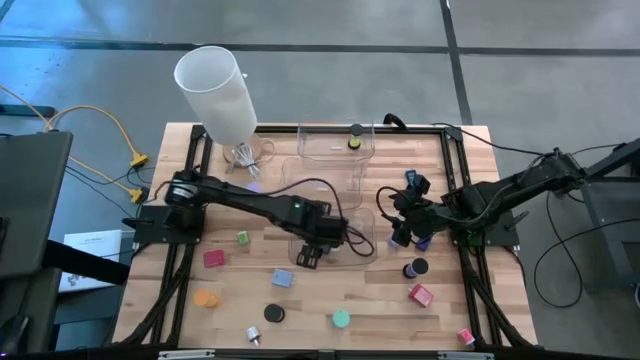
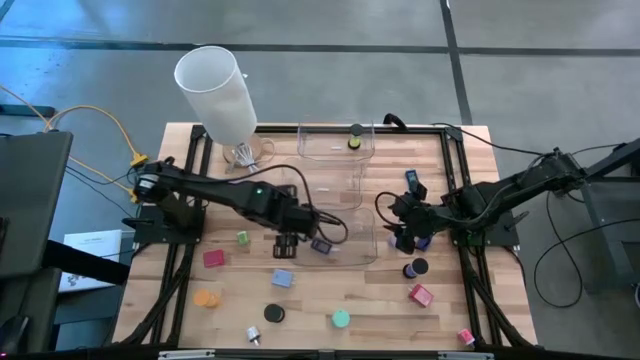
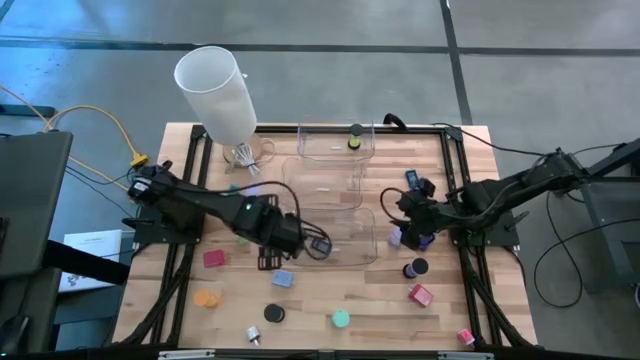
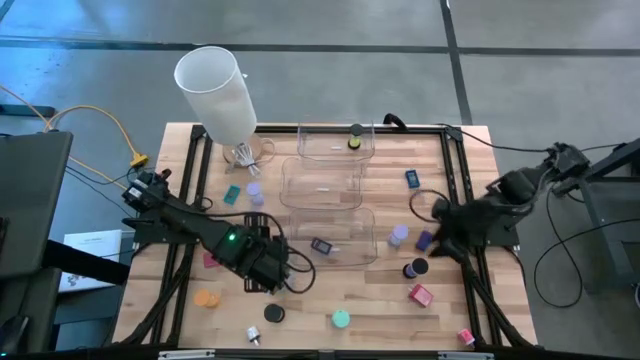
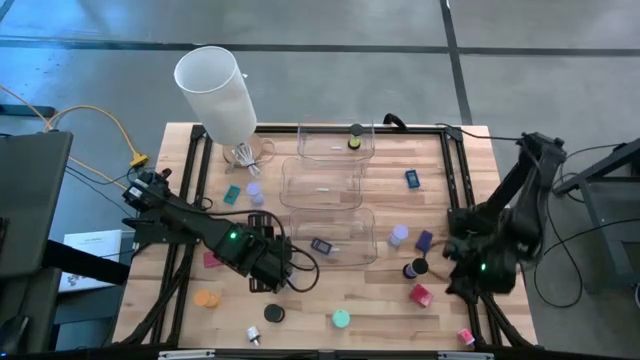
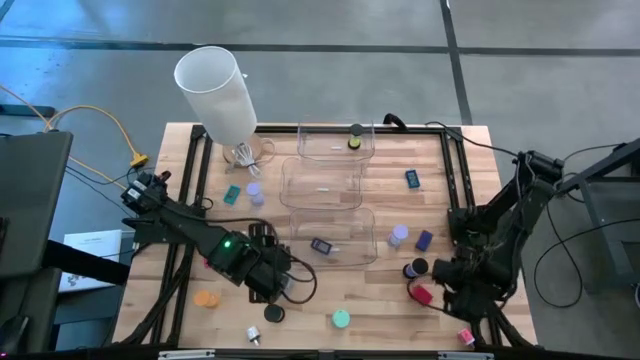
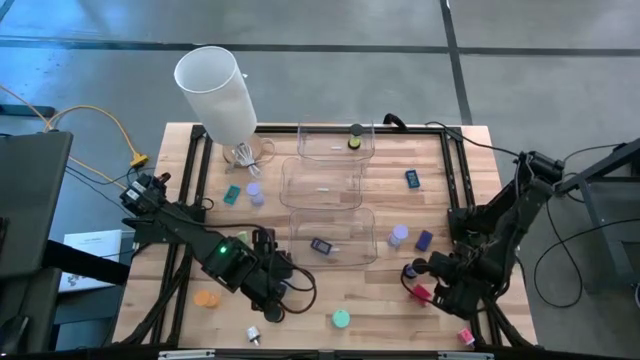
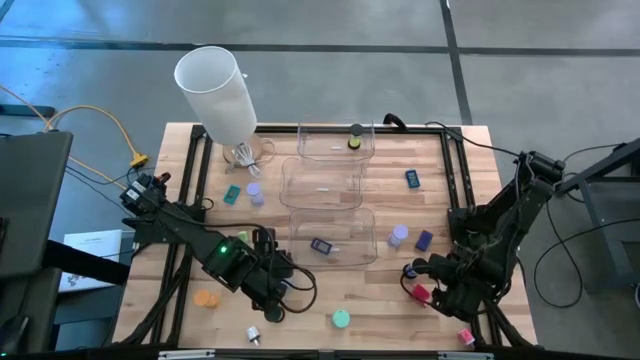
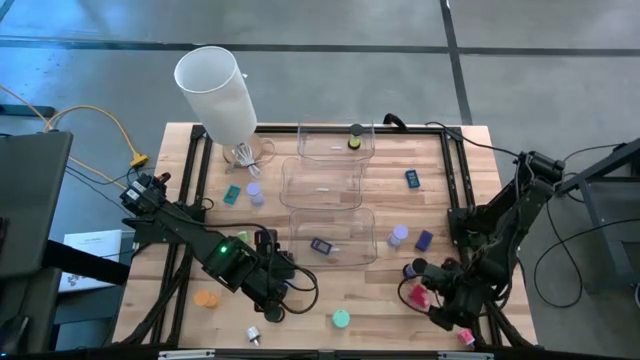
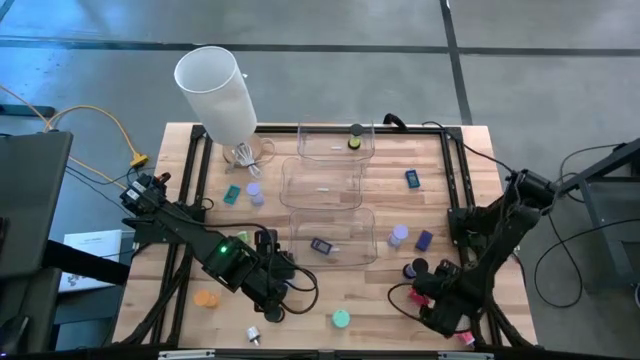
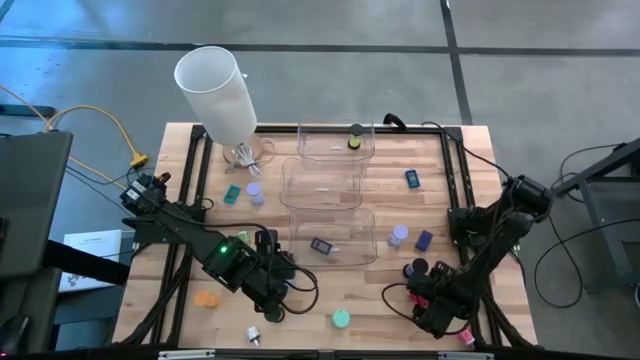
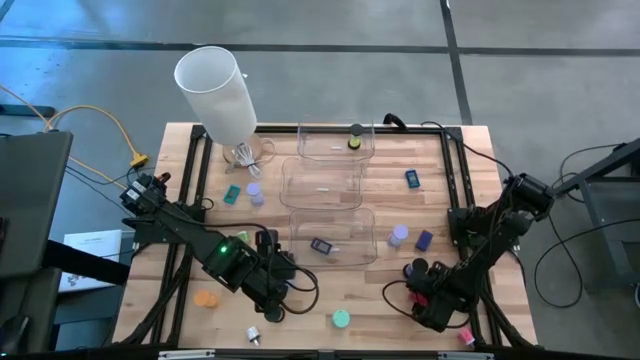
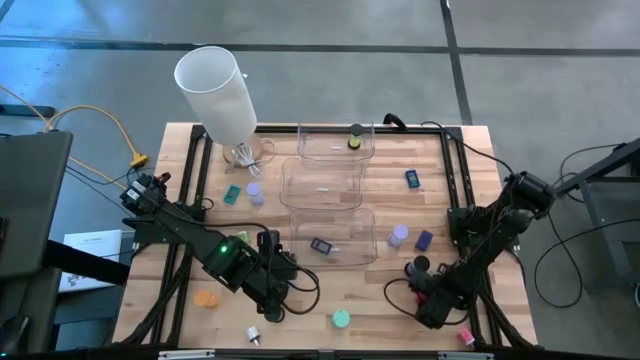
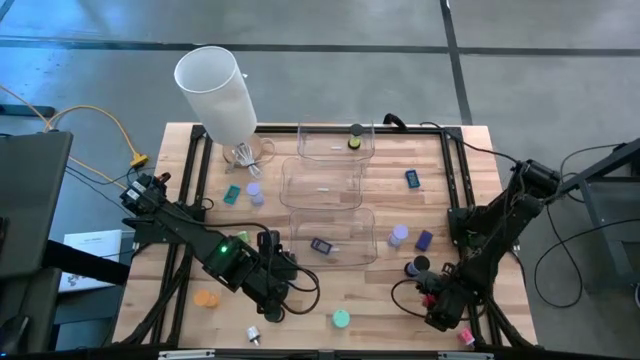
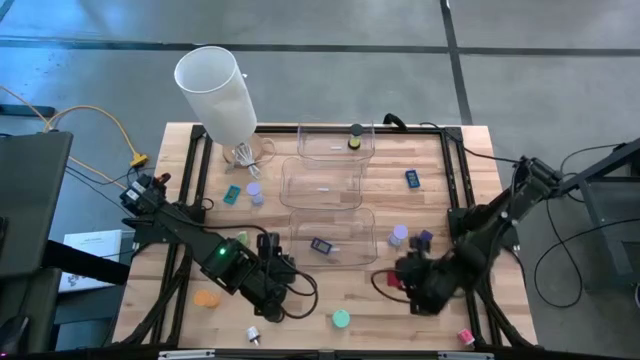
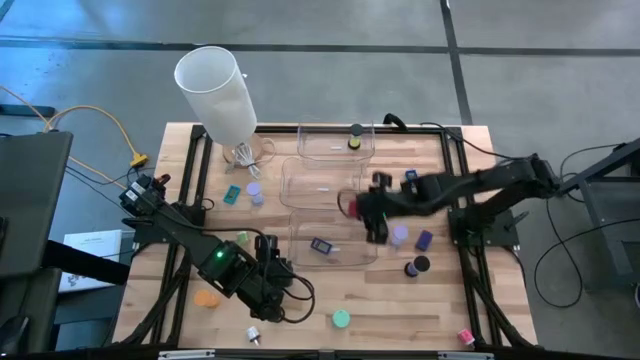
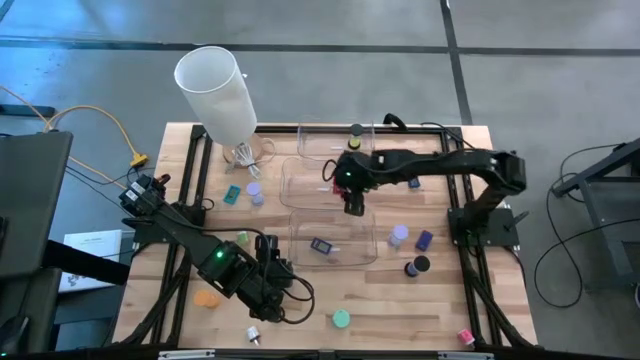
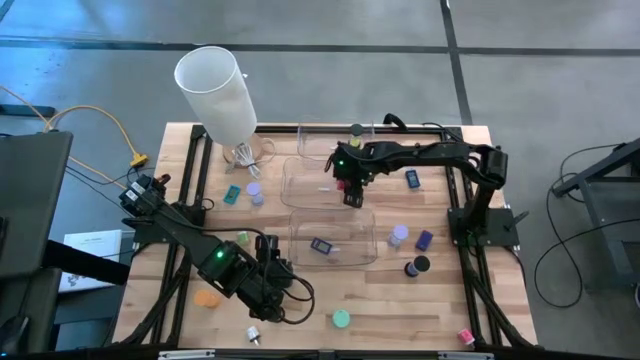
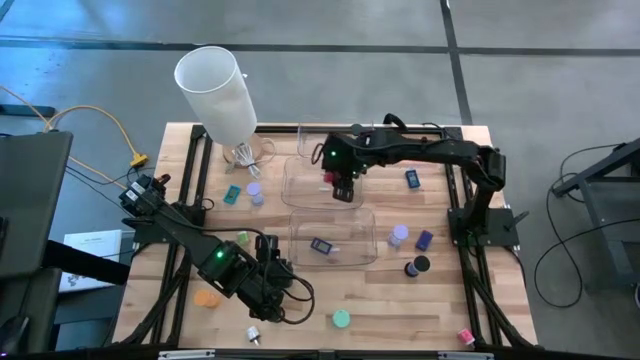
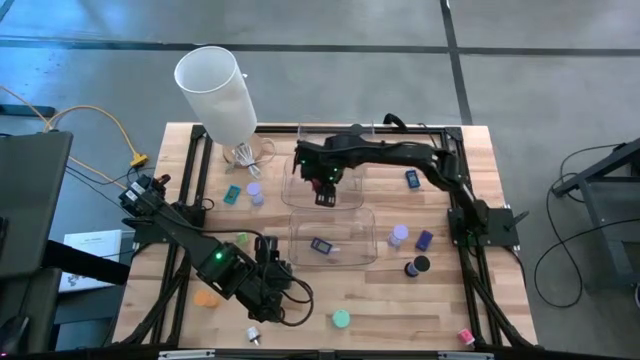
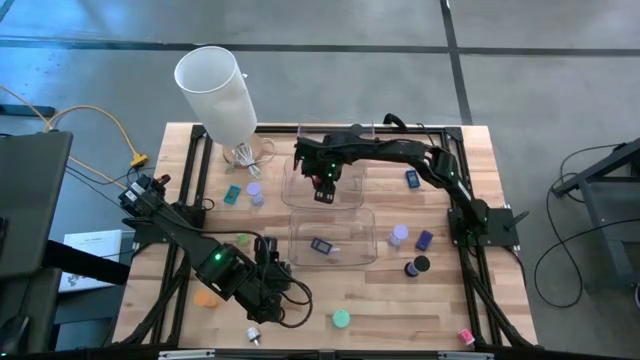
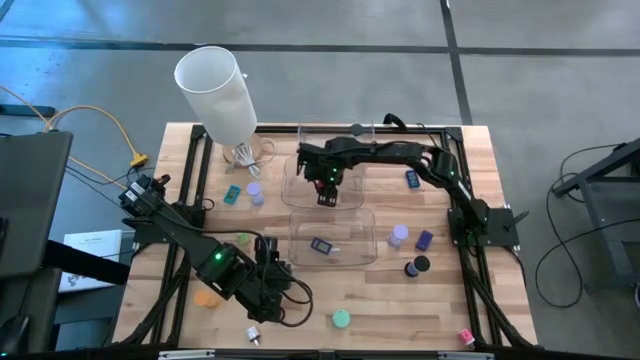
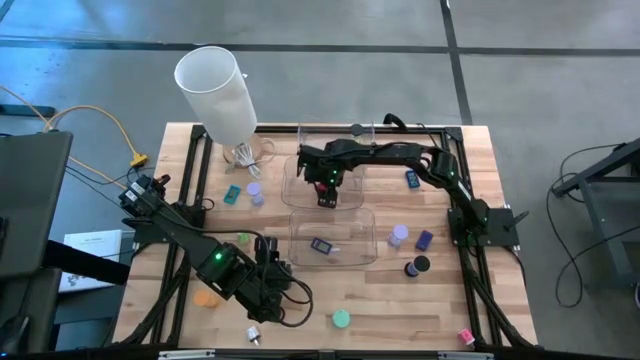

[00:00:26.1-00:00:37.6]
Task: Pick & Place Office items
Put the right red charger adapter into the middle transparent bin

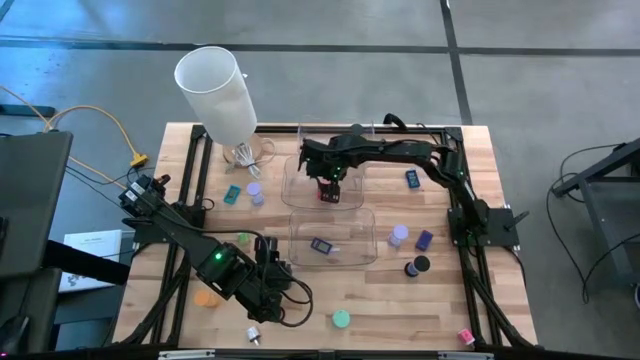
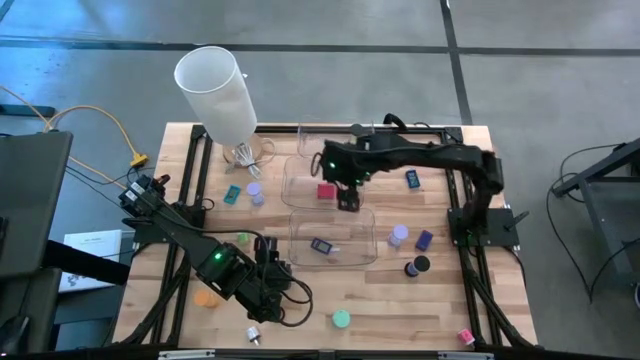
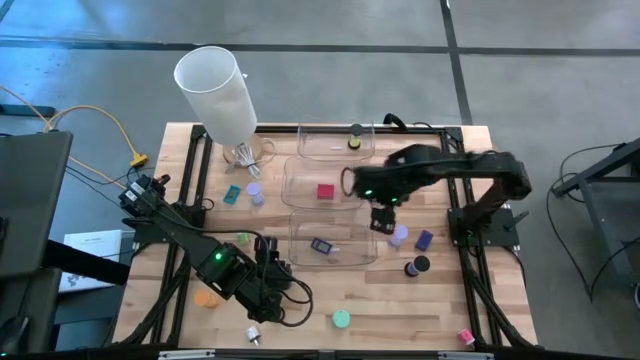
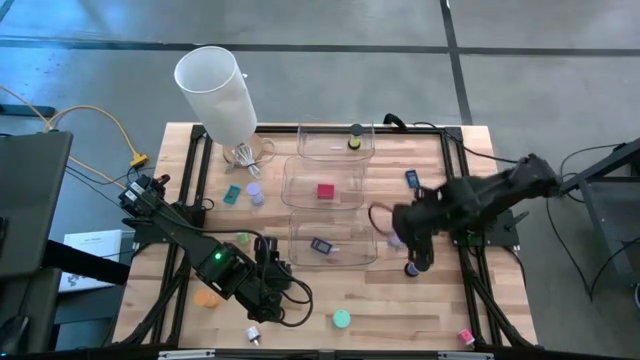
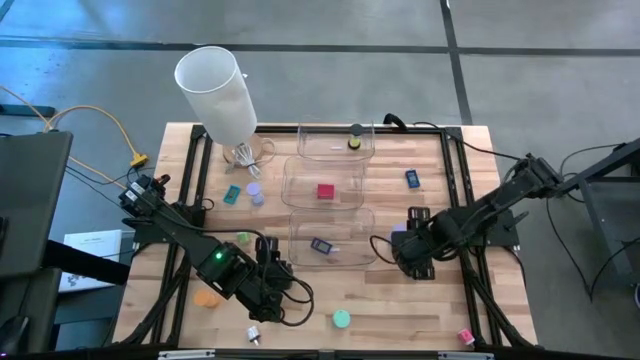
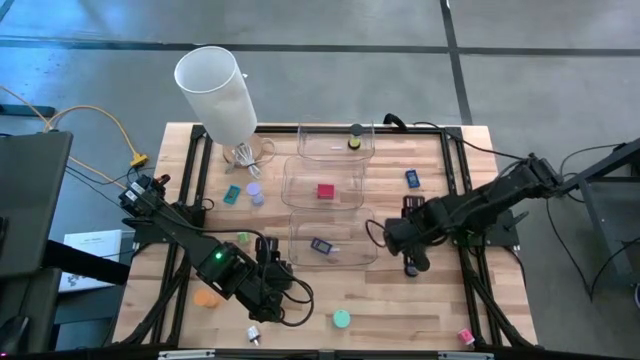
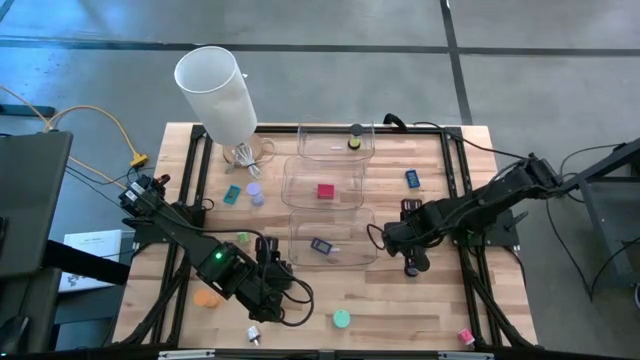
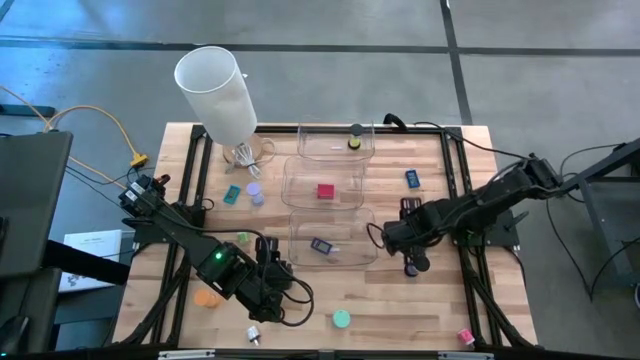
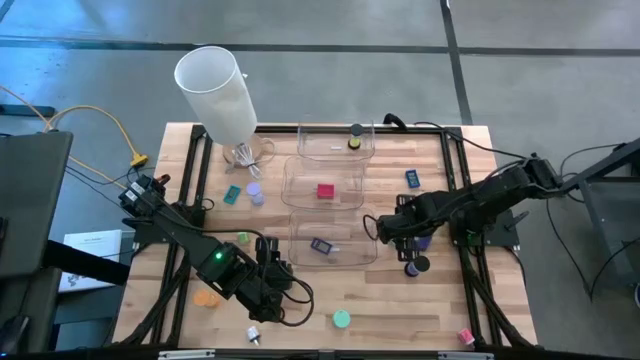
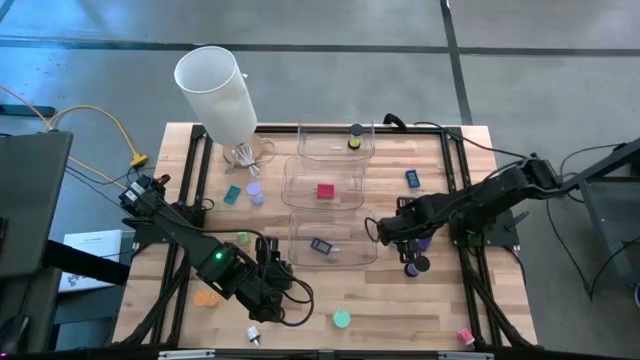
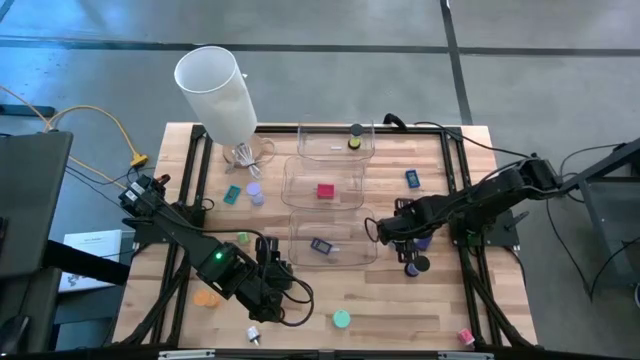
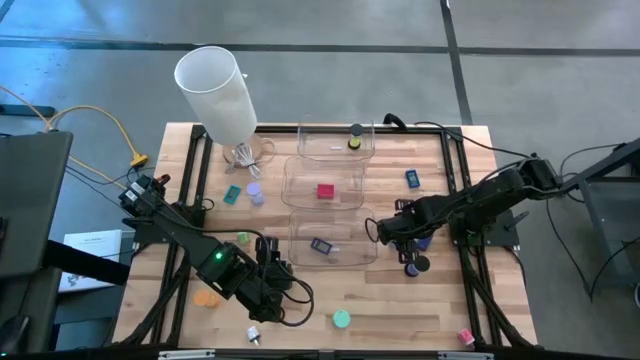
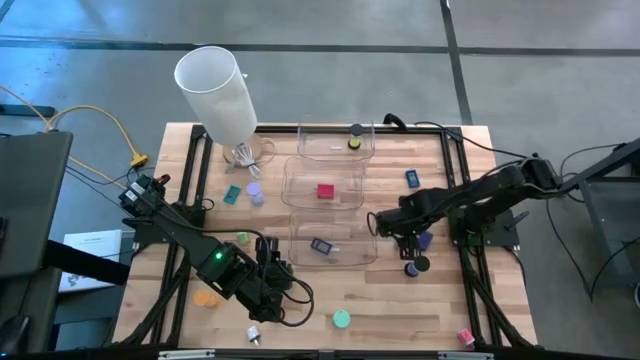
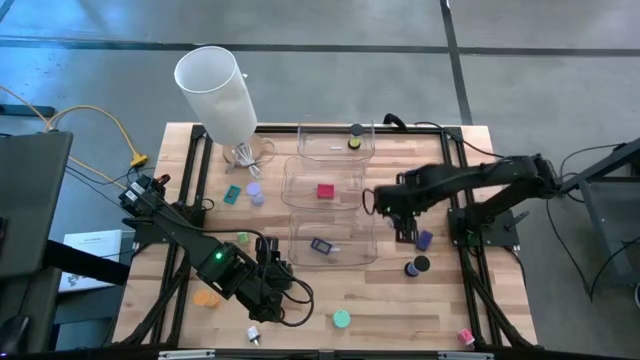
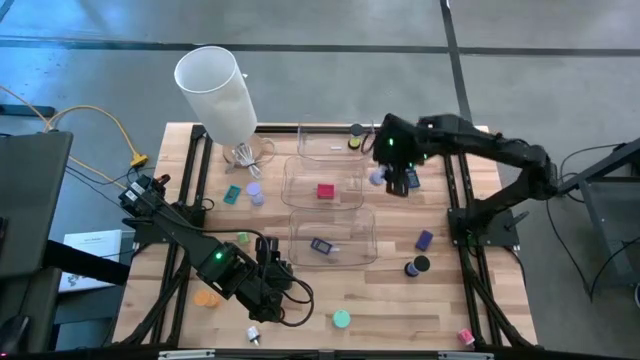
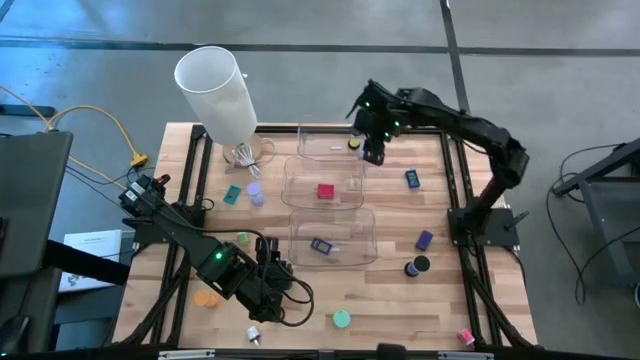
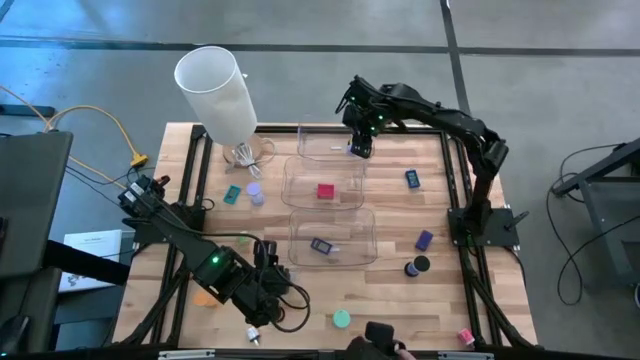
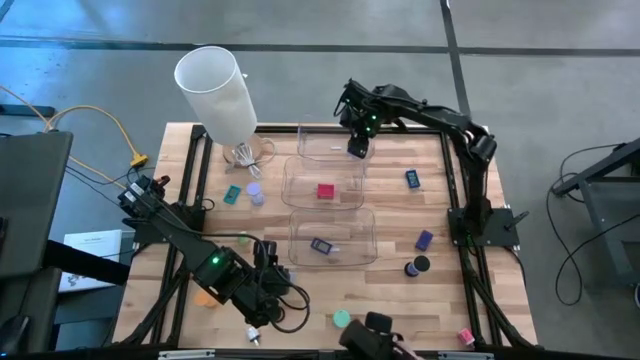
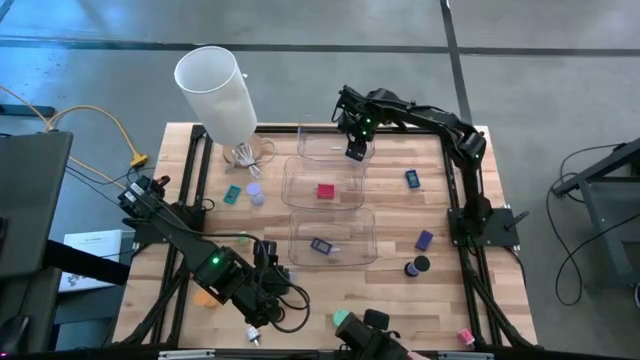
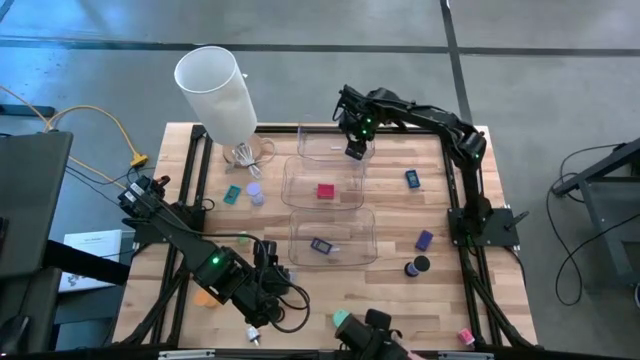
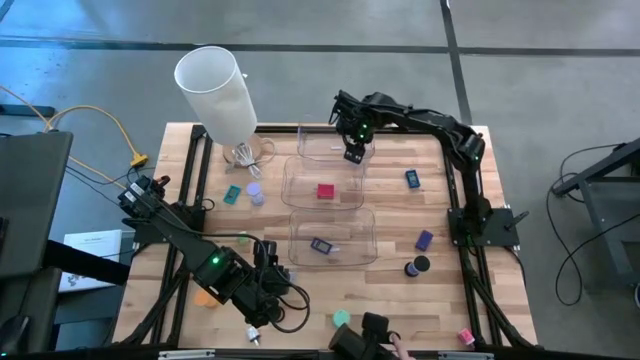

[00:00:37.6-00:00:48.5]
Put the right light purple hourglass into the top transparent bin
